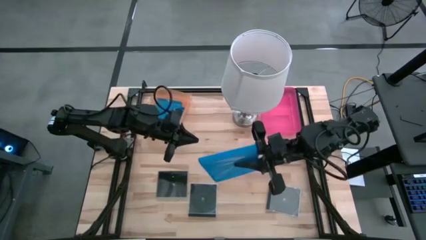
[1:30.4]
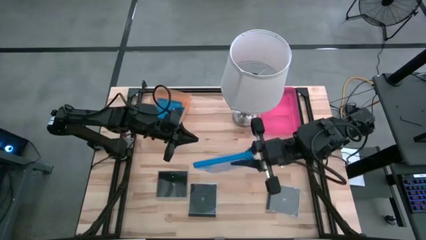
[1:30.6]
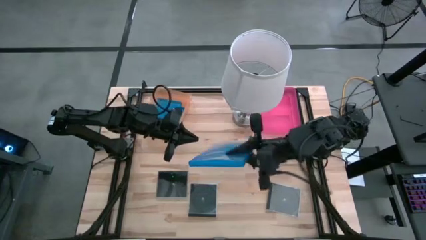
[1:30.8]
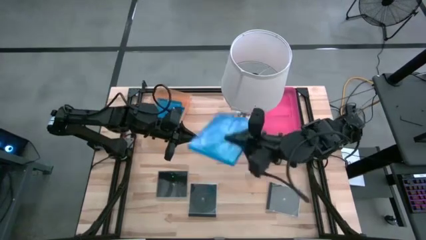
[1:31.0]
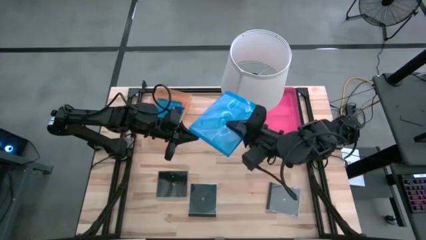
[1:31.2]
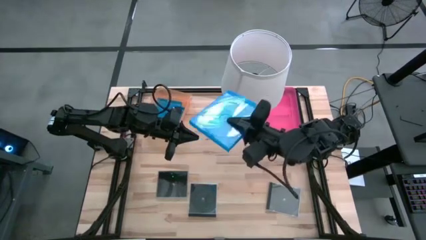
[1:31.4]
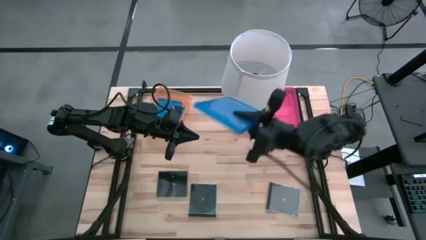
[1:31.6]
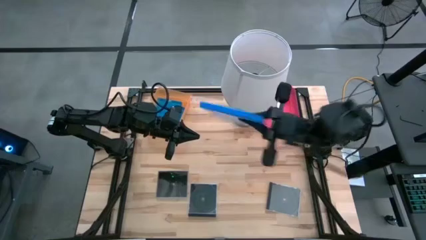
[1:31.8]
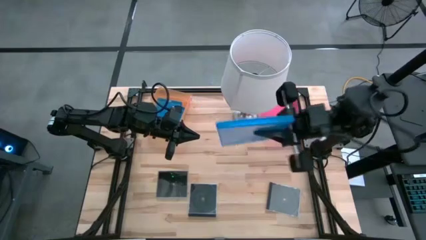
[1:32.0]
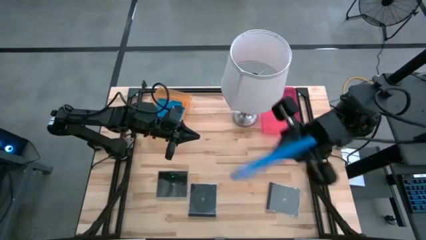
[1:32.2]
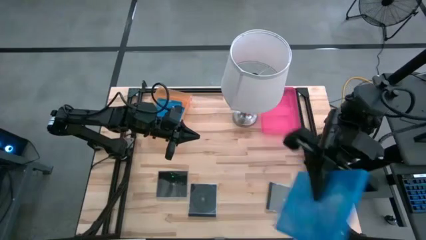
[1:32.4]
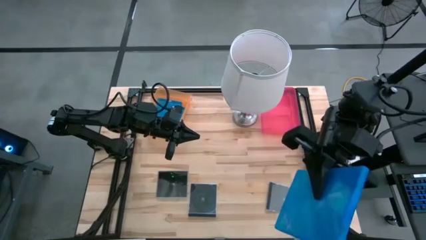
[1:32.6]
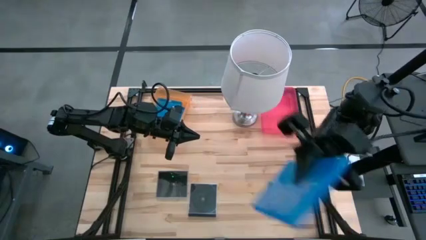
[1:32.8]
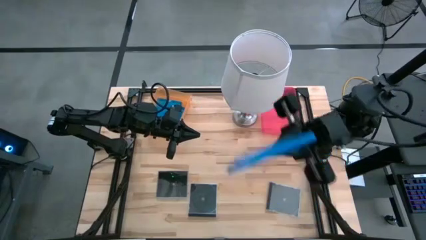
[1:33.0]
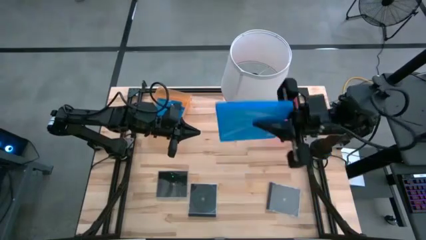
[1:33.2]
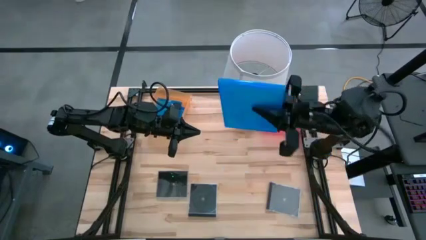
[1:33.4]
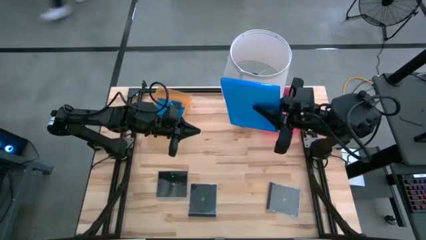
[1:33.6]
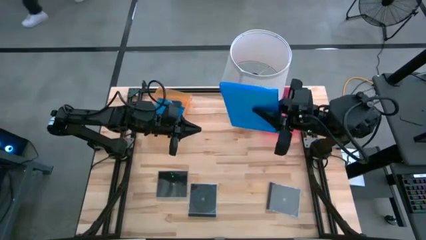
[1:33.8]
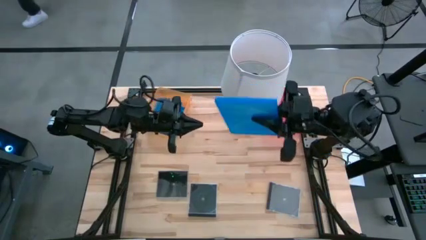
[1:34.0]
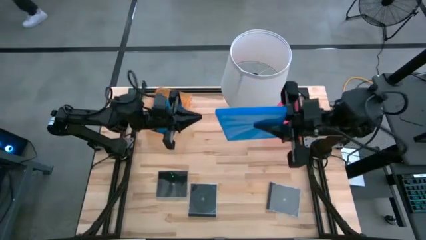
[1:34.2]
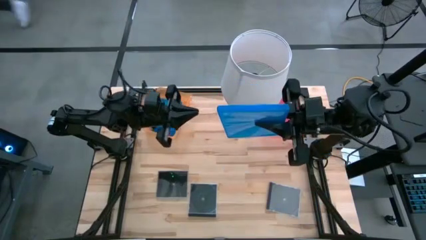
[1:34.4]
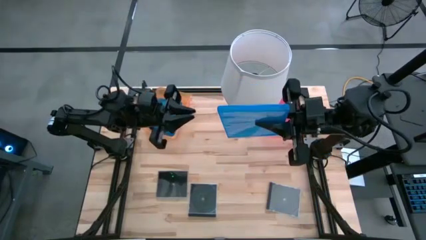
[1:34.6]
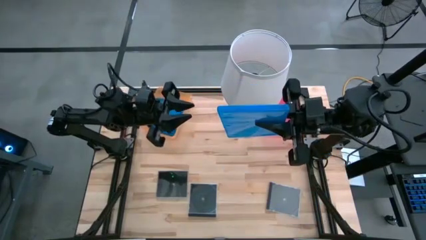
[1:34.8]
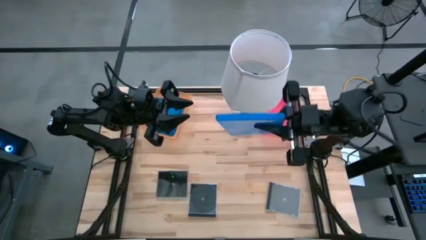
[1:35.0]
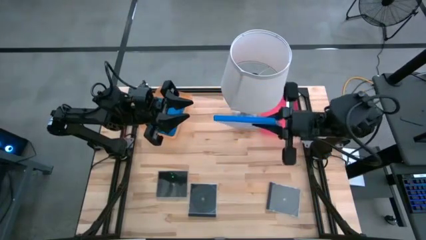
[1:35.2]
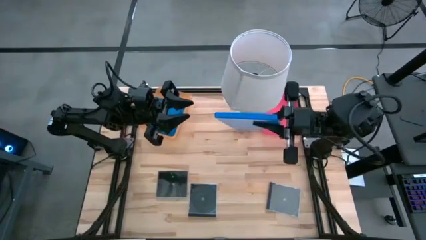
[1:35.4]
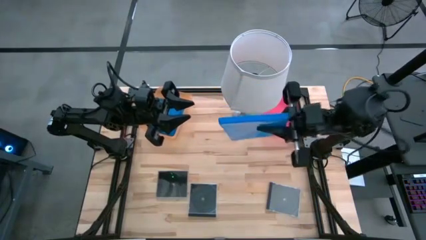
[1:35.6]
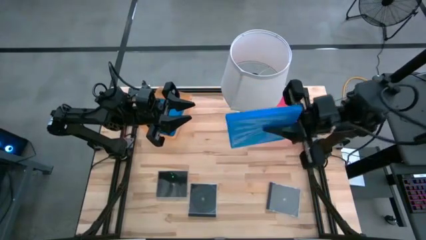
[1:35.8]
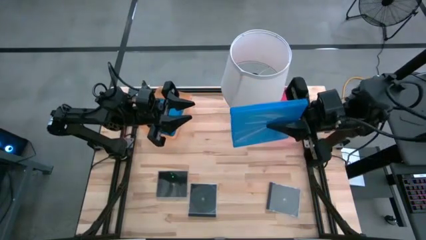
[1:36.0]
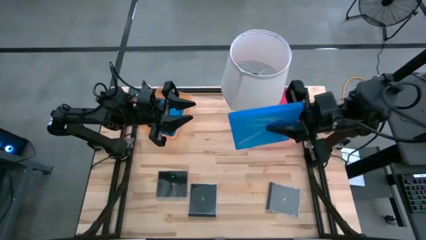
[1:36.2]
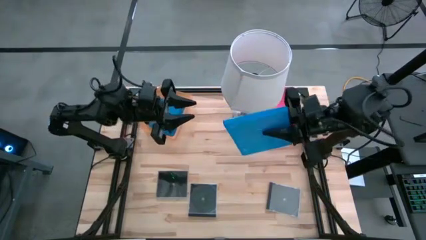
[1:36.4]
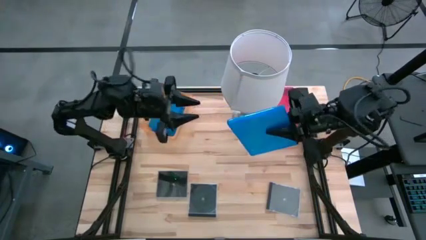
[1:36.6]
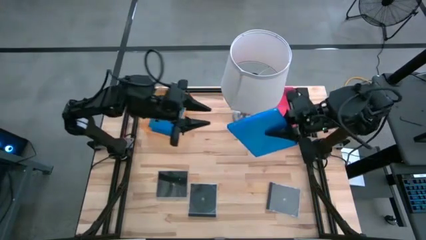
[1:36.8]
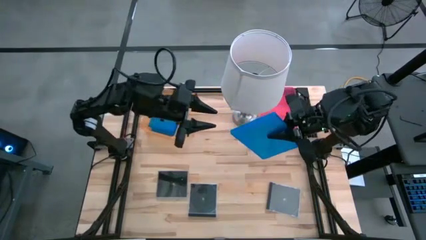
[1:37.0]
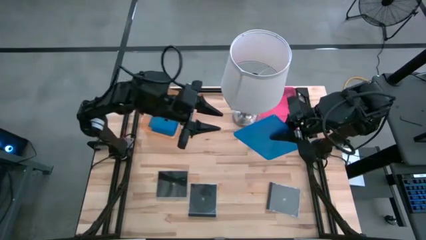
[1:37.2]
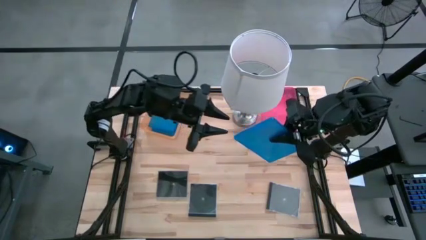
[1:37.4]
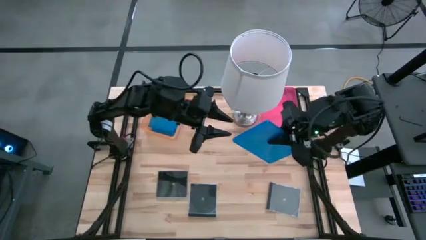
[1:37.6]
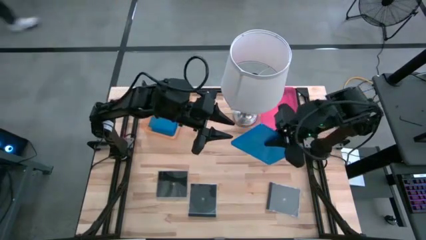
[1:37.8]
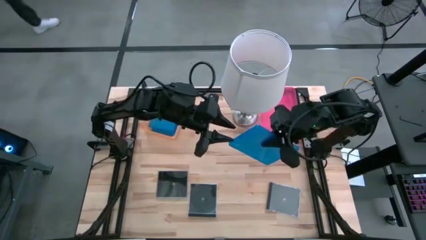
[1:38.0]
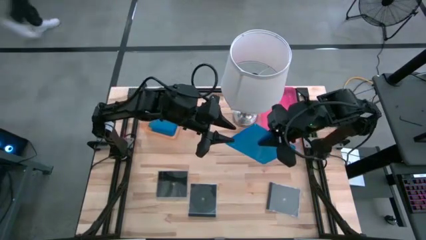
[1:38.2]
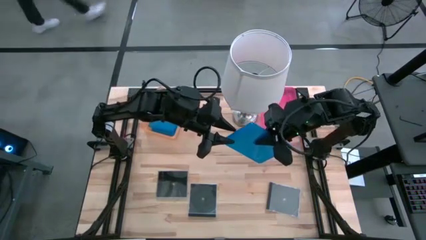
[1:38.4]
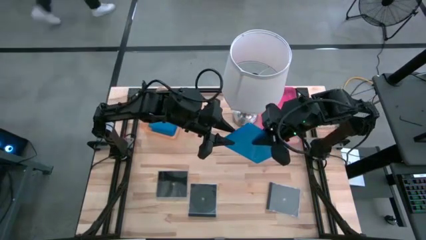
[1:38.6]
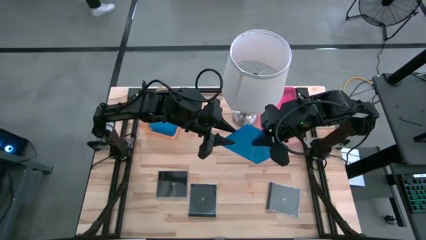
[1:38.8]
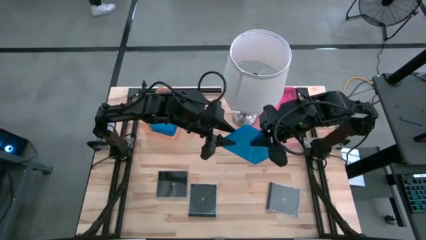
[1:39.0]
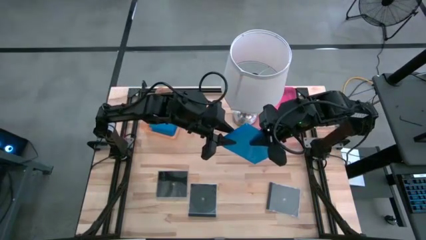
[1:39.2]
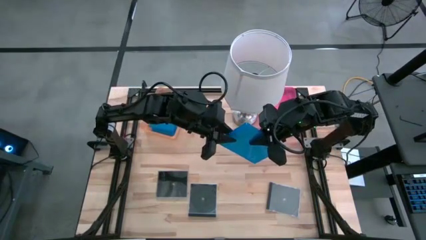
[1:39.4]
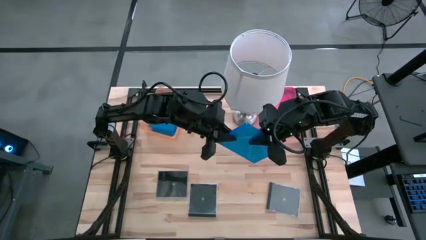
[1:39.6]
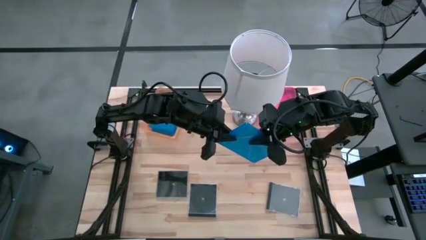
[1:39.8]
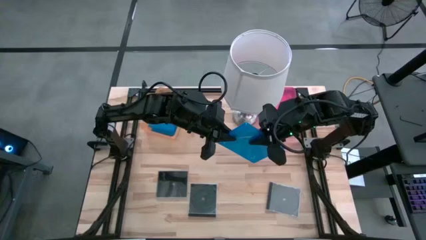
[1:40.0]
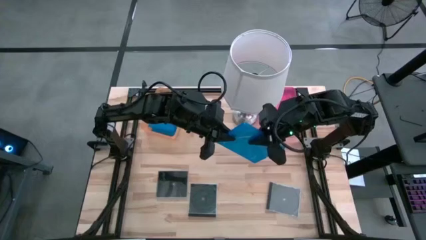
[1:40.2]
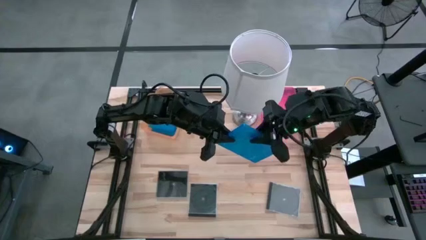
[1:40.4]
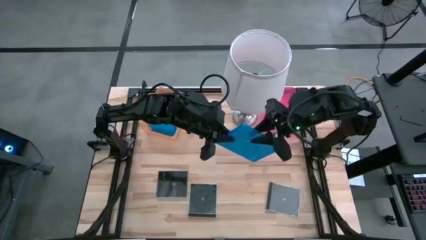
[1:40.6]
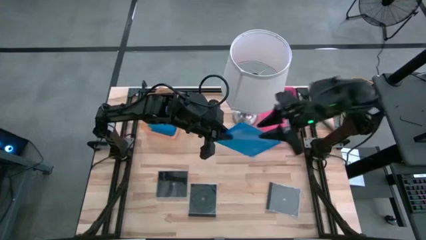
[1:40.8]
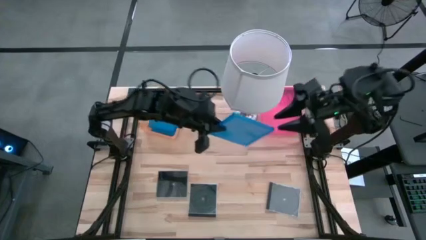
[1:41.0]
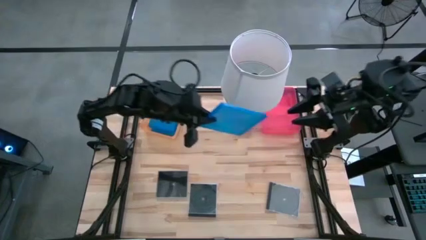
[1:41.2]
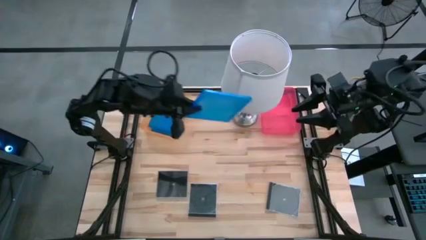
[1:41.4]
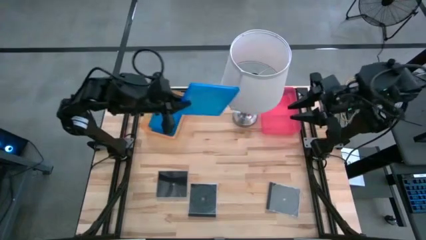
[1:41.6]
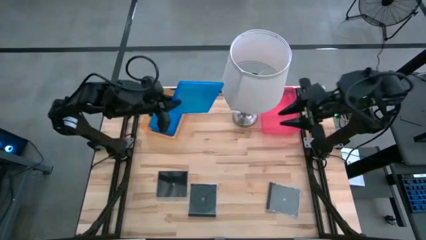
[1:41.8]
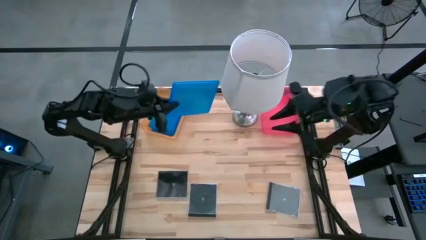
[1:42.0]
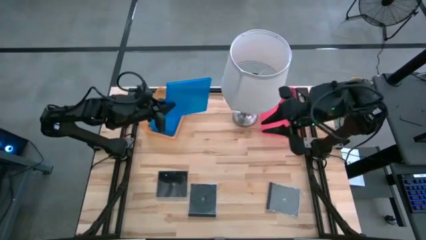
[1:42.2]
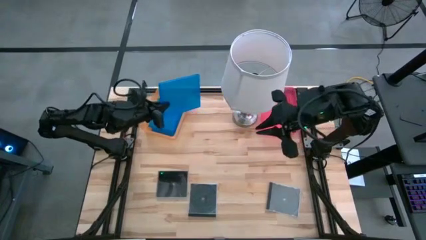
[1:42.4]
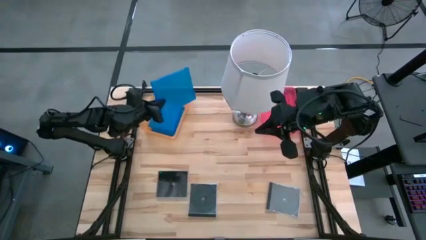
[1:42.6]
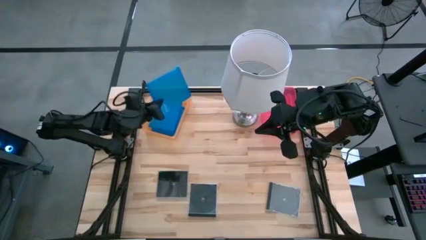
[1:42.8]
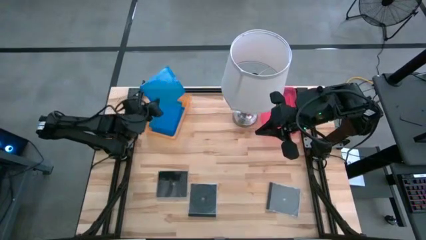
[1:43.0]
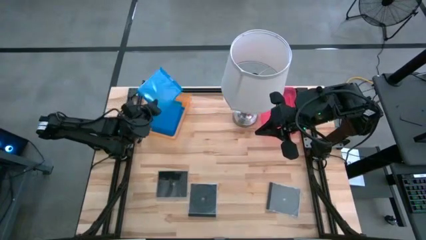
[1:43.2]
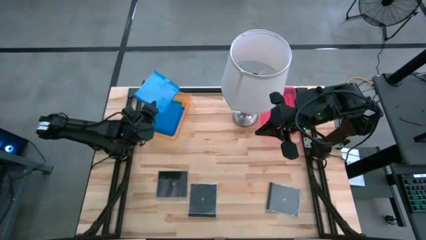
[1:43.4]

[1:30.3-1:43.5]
Task: Pick & place jewel cases by type
Put the blue cd case into the orange bin
